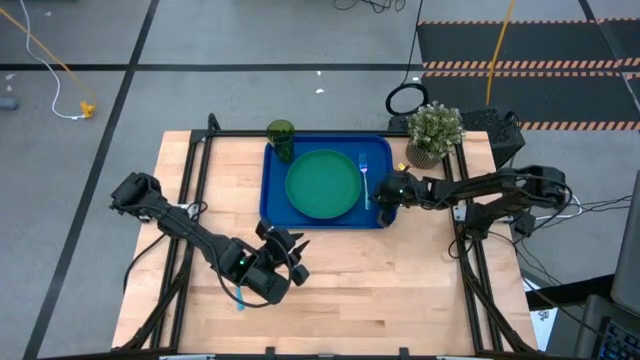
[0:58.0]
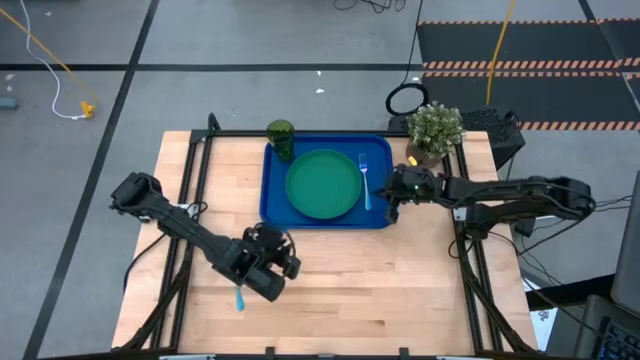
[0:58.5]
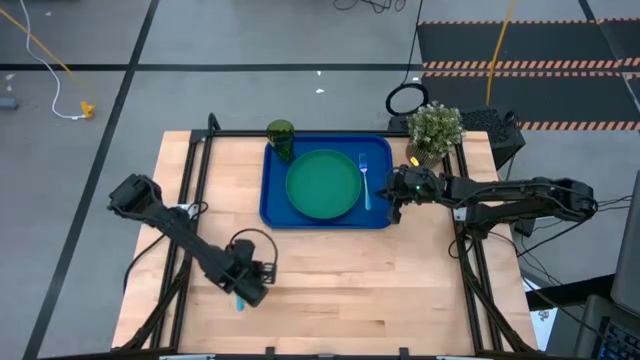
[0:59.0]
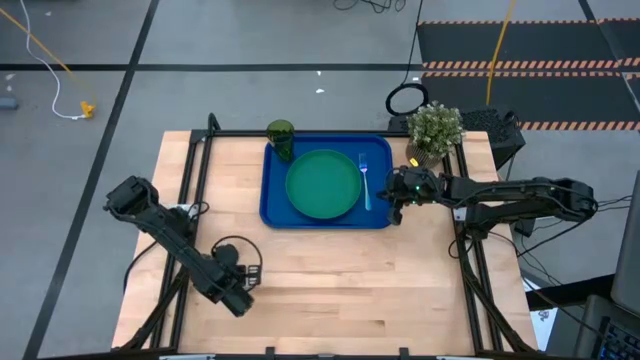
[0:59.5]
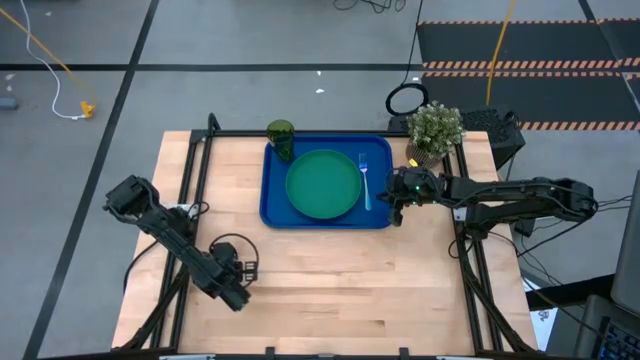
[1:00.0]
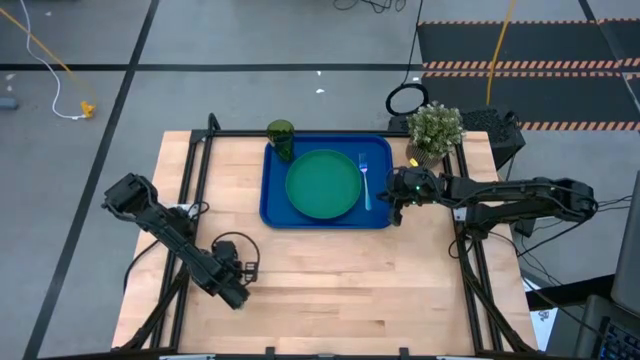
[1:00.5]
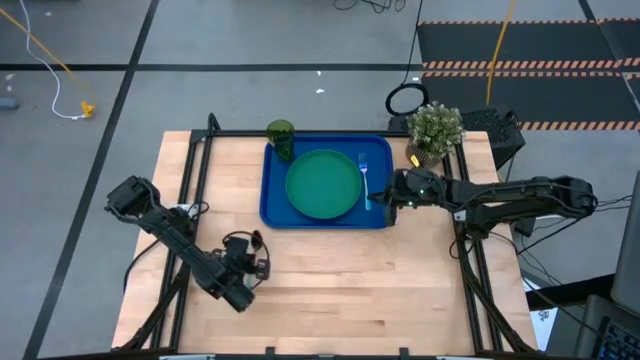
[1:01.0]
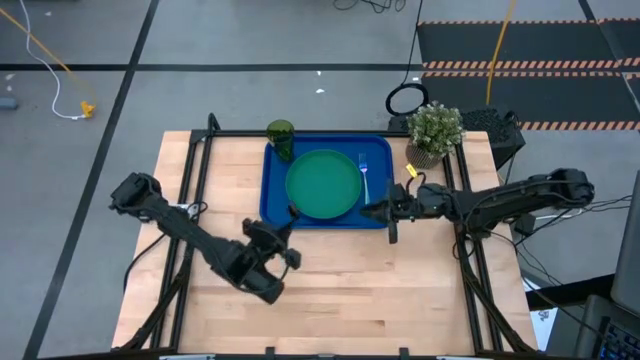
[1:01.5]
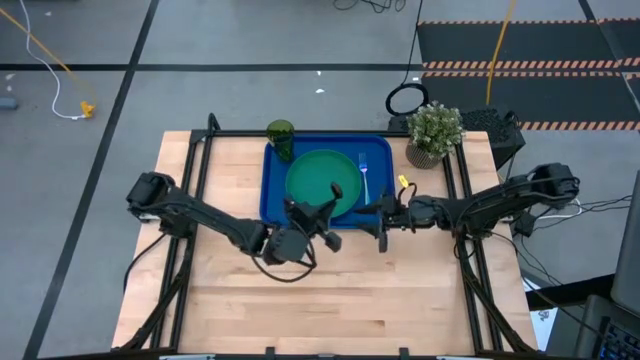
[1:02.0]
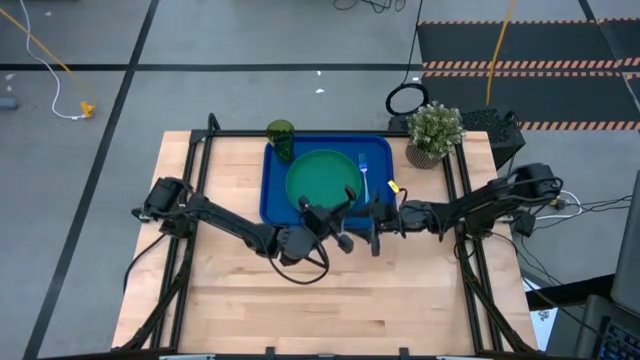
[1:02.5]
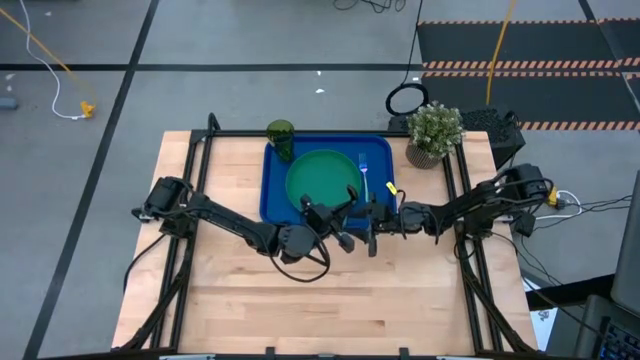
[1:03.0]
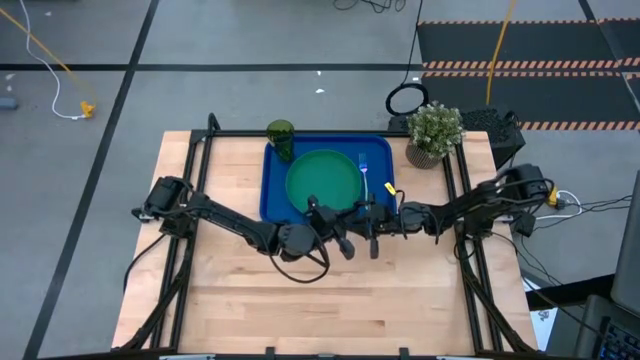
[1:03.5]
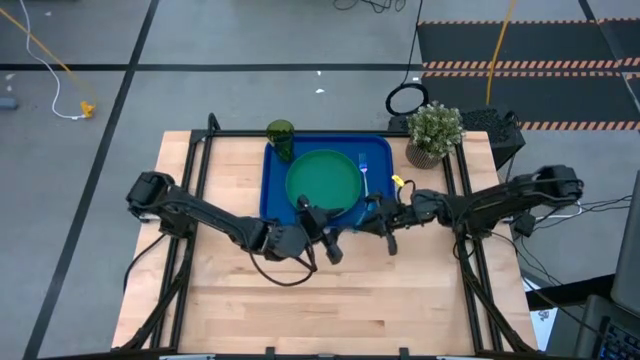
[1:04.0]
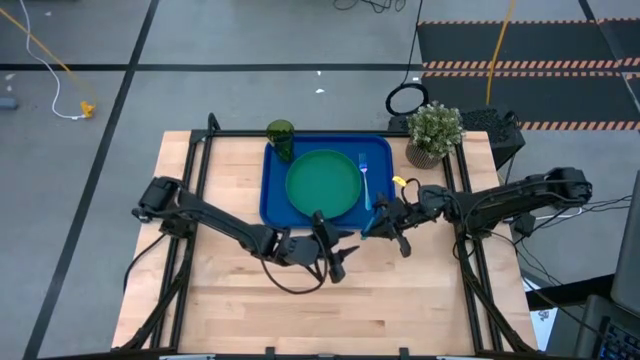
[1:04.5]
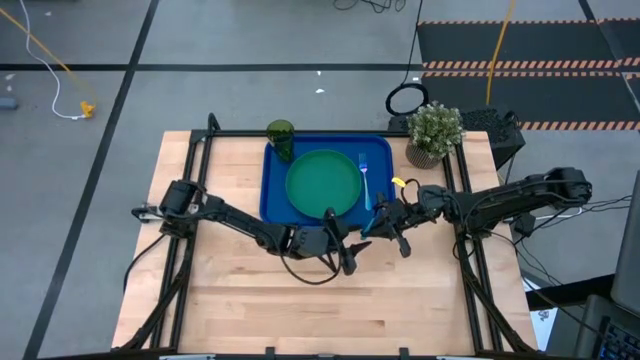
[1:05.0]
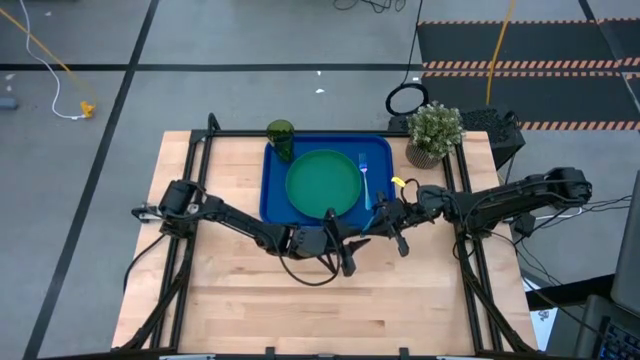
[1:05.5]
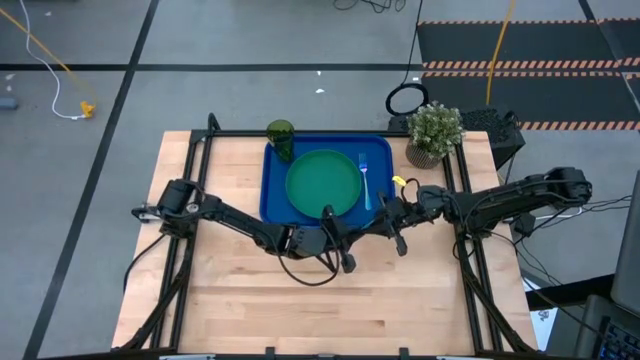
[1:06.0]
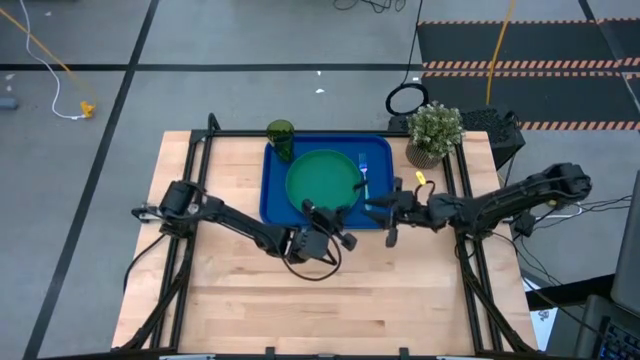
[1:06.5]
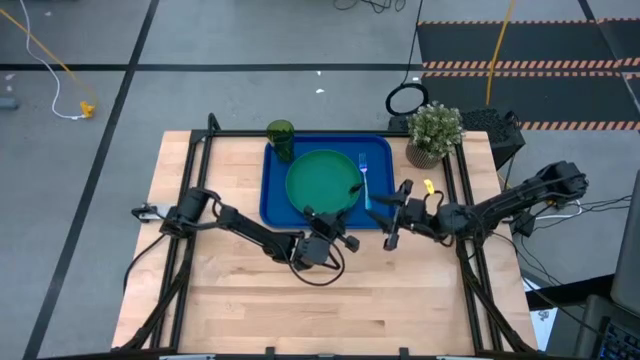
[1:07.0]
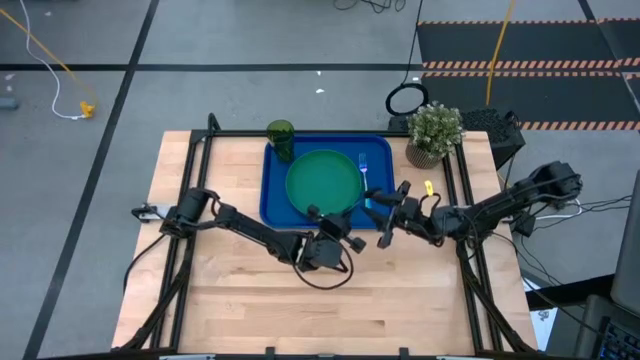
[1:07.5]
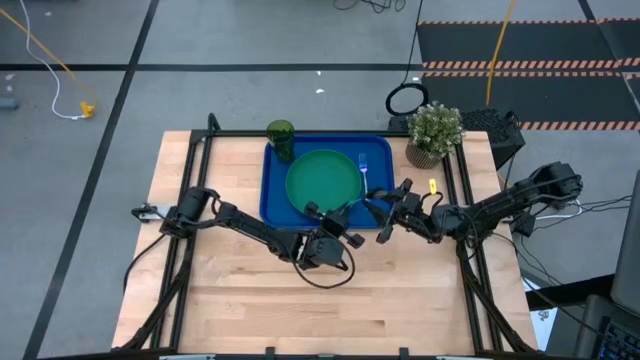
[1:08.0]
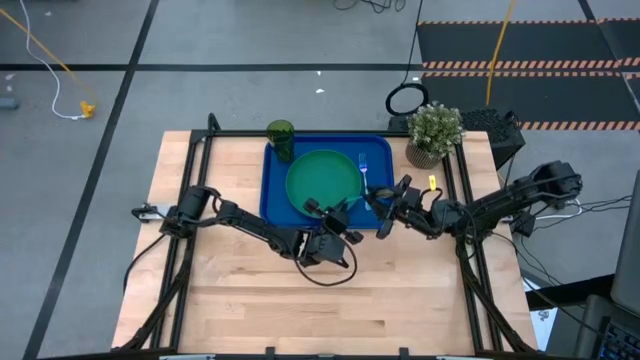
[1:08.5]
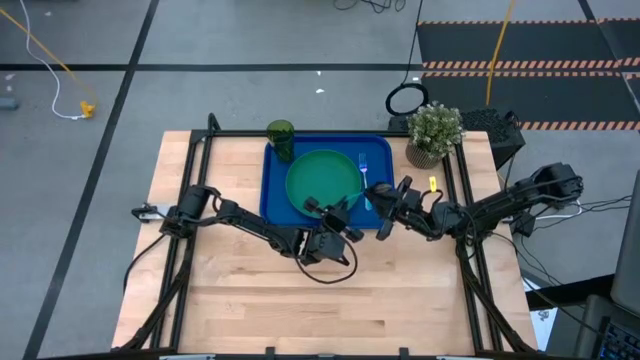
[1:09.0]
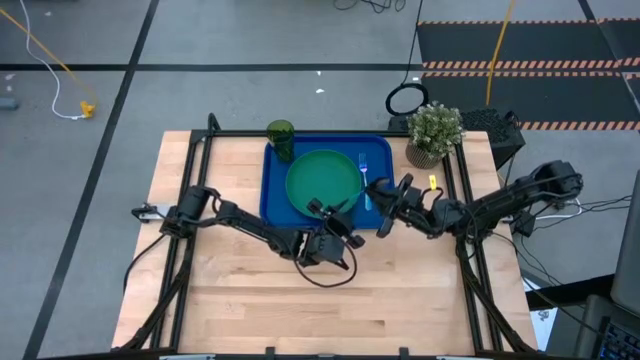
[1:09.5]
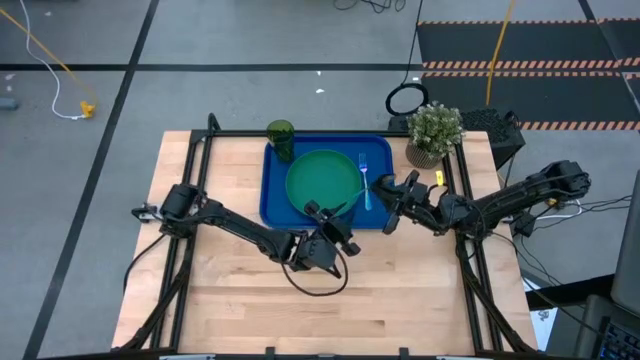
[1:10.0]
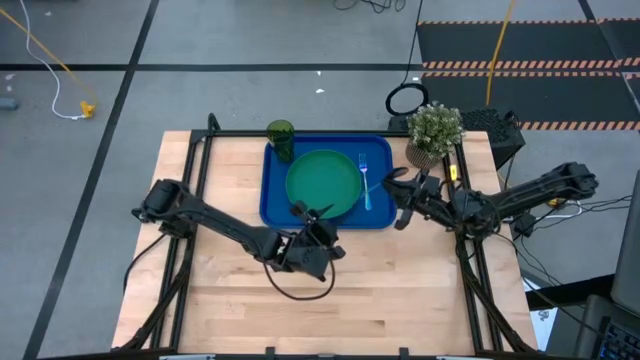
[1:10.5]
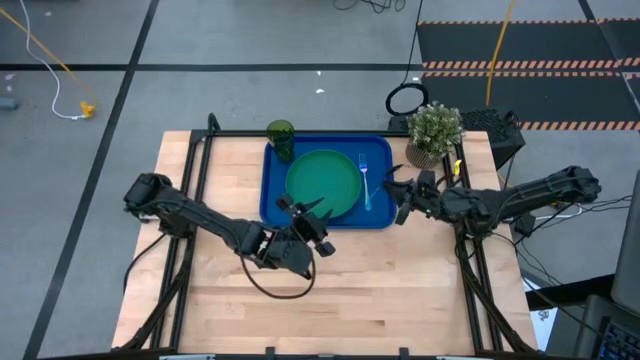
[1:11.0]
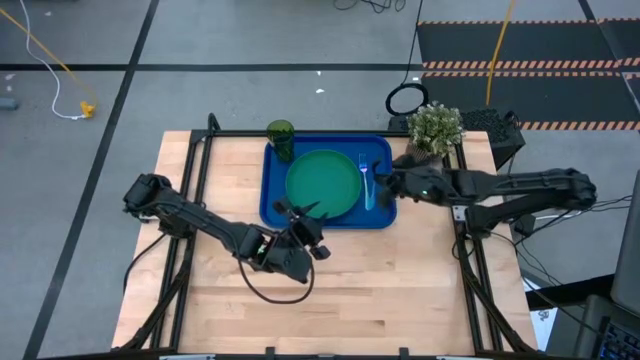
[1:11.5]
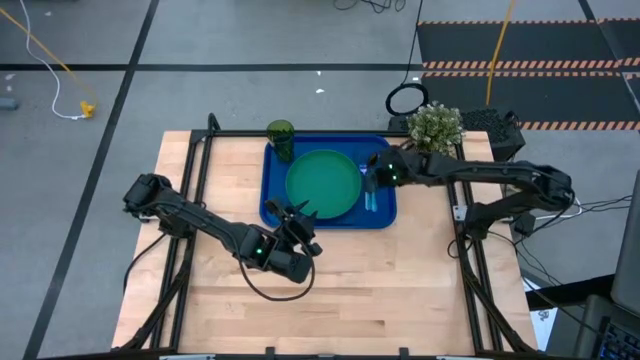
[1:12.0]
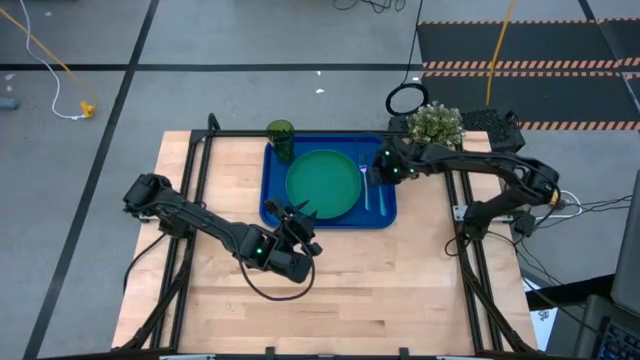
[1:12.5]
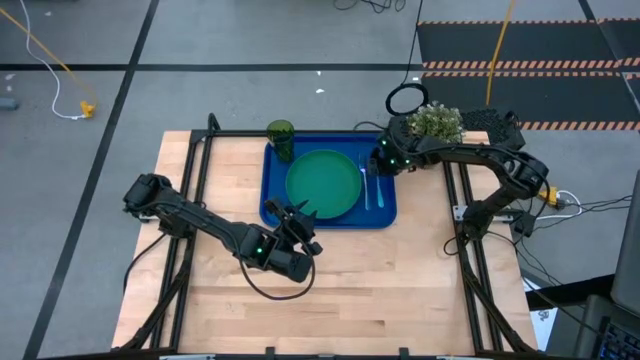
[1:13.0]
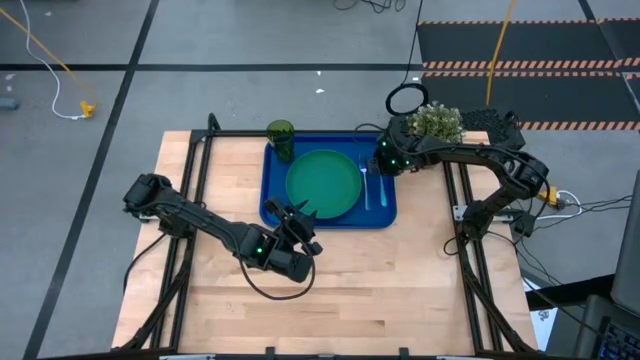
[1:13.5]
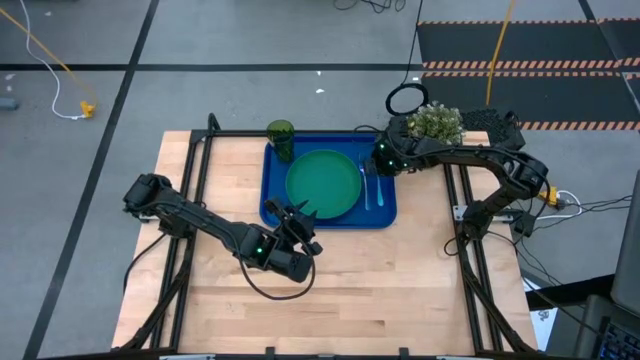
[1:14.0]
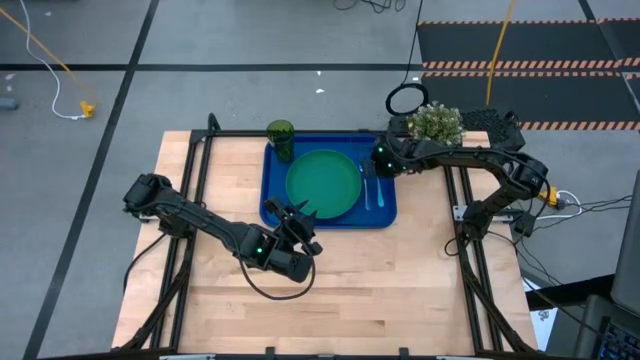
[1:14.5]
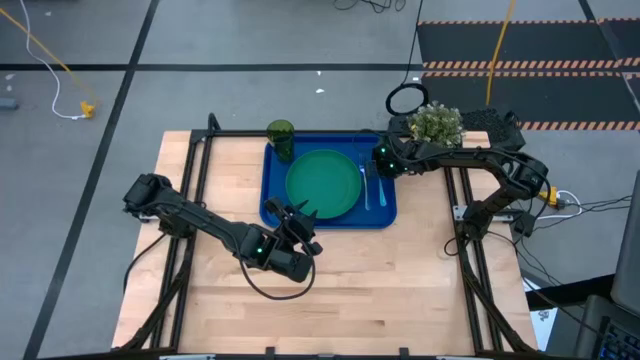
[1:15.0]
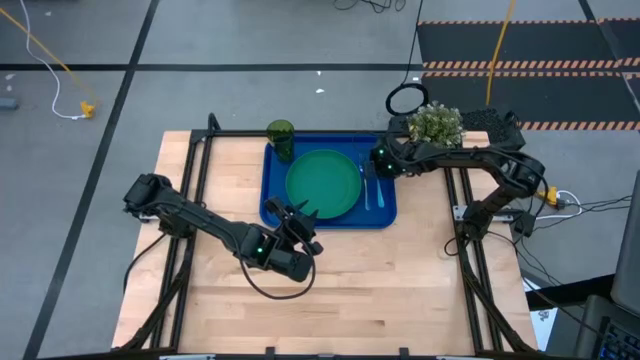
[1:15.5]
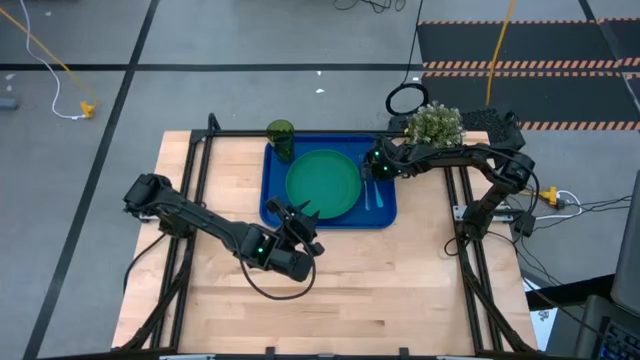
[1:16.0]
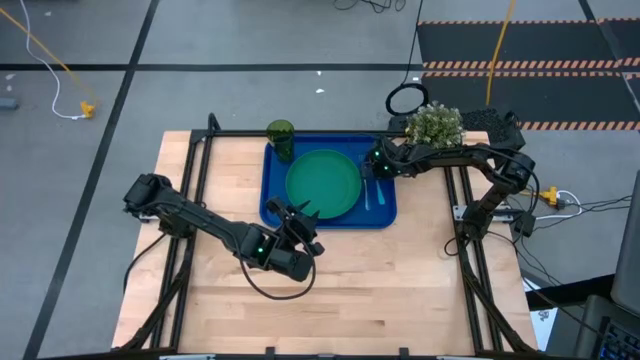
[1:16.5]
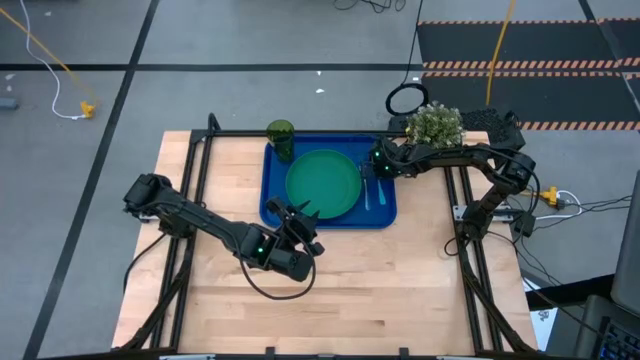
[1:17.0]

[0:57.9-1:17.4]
Task: Pick and place plate/cup/fork/spoon on tray
Put the spoon beside the blue fork

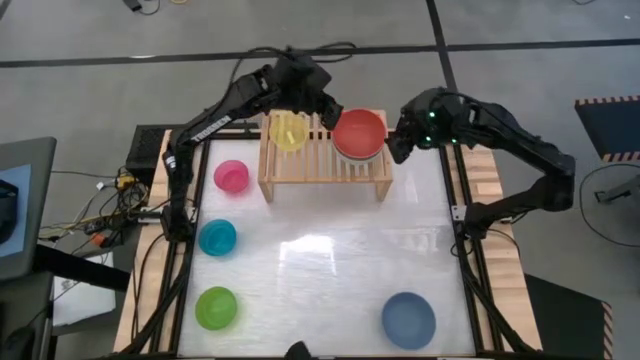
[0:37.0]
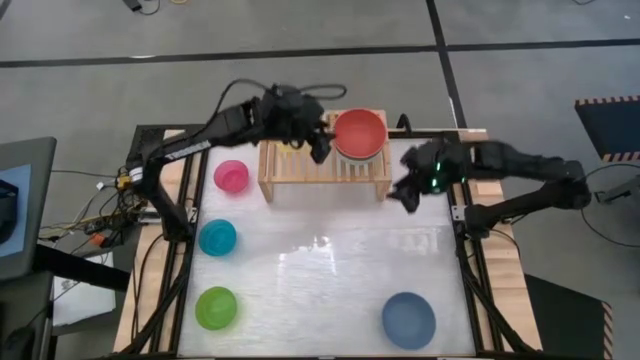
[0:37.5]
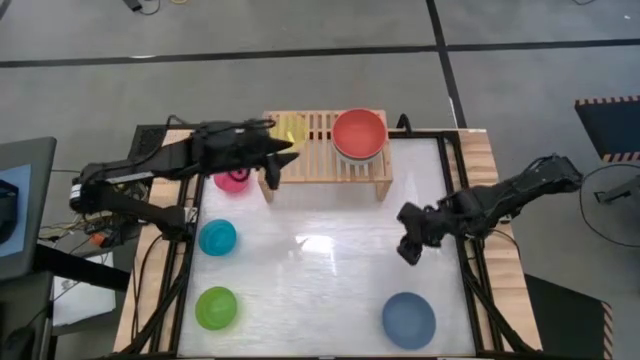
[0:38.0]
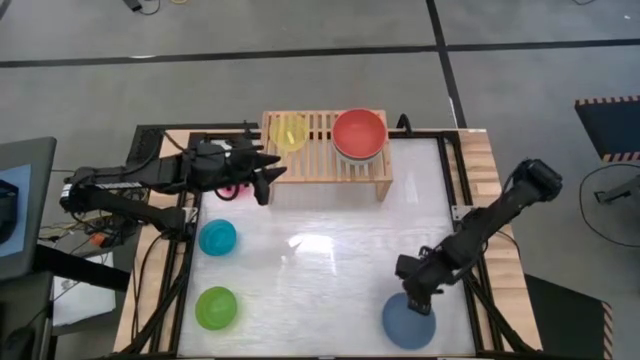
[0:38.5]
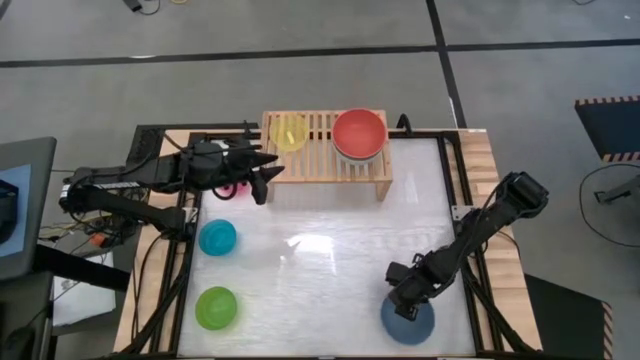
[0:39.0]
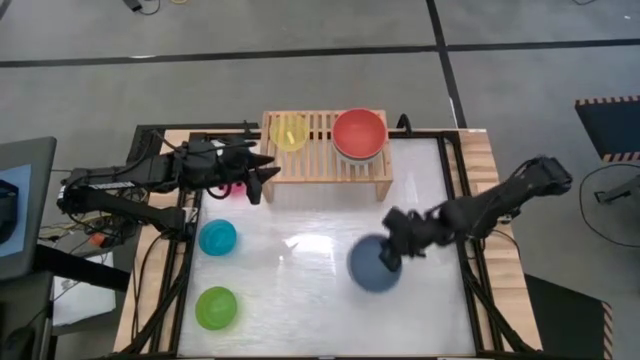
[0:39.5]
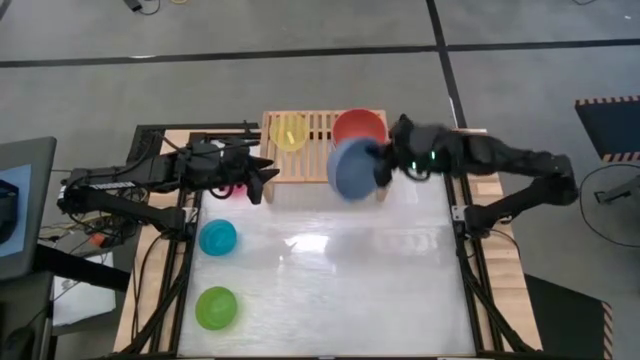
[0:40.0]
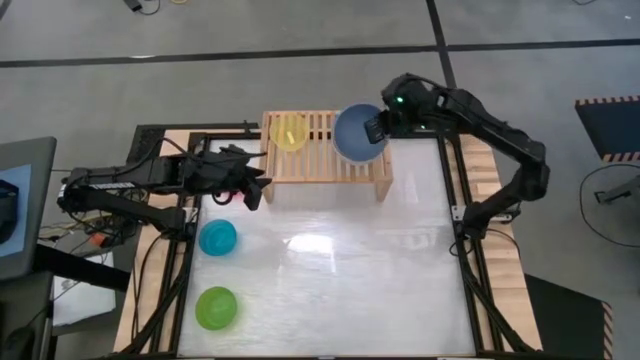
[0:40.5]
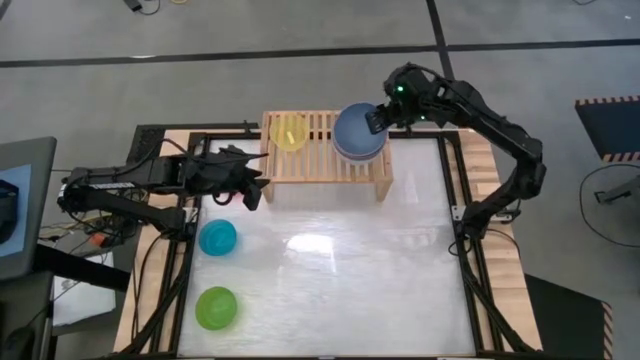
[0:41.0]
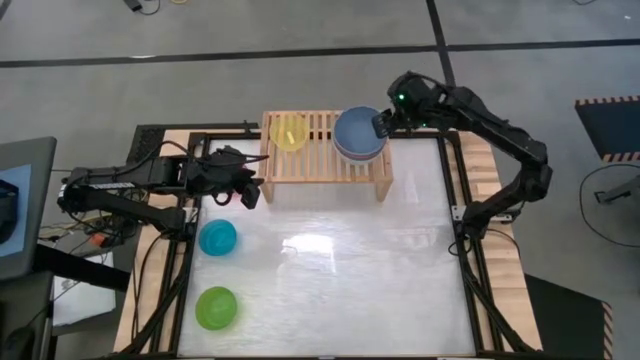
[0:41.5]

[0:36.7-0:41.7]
Task: Place and stack bowls onto a shelf
Stack the blue bowl on top of the orange bowl on the shelf
